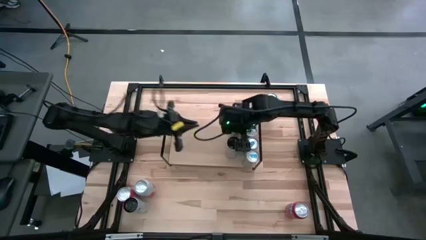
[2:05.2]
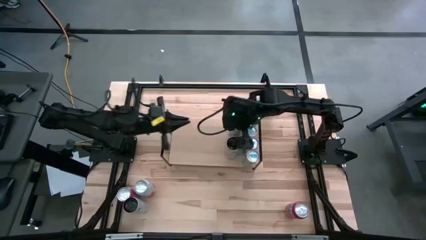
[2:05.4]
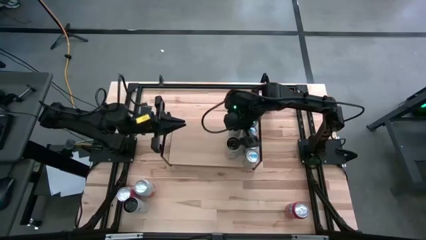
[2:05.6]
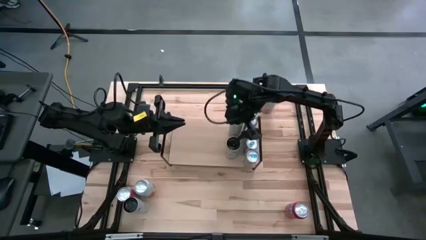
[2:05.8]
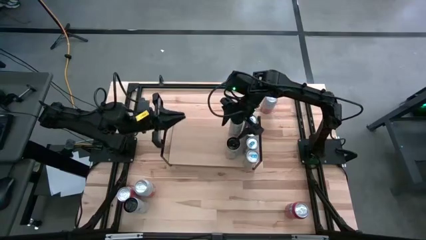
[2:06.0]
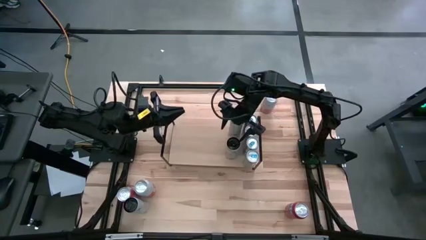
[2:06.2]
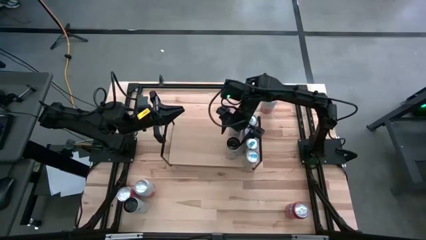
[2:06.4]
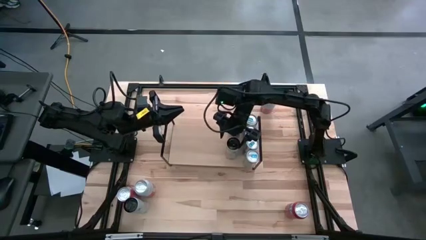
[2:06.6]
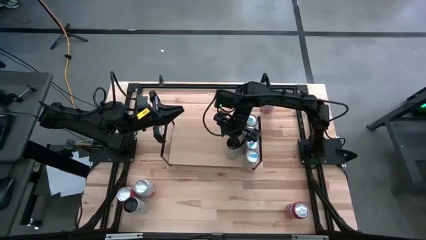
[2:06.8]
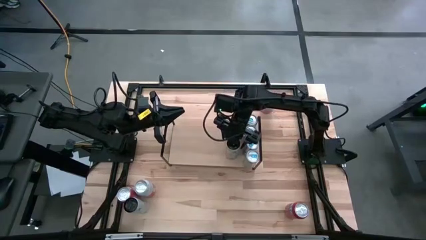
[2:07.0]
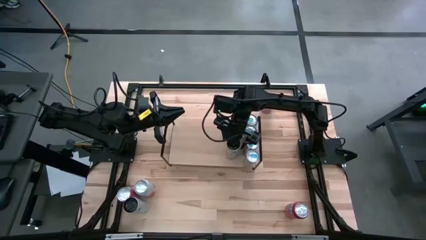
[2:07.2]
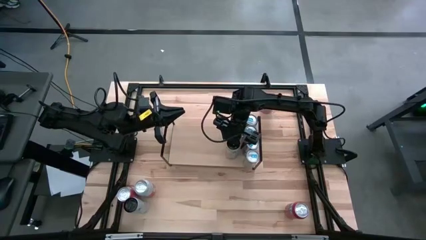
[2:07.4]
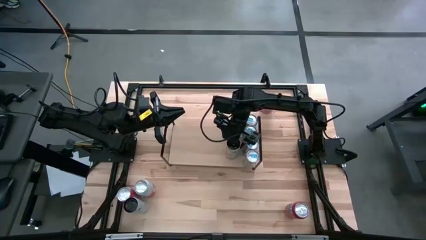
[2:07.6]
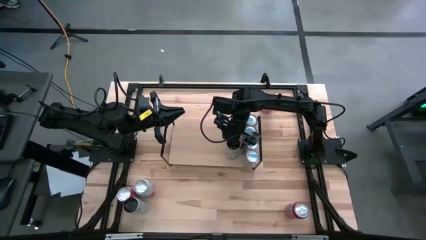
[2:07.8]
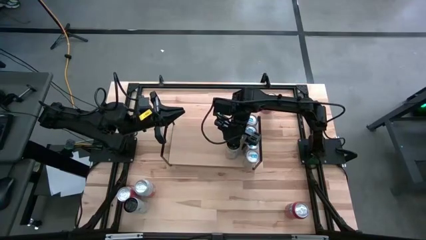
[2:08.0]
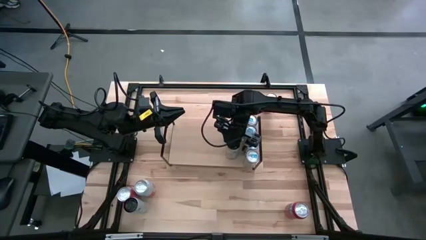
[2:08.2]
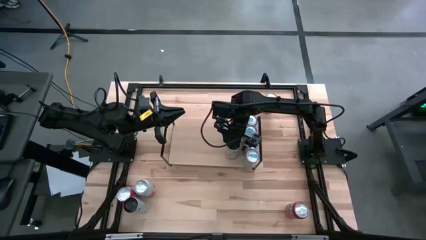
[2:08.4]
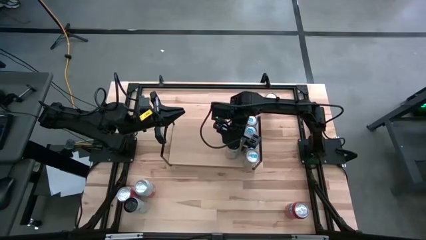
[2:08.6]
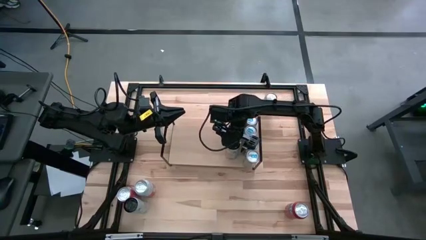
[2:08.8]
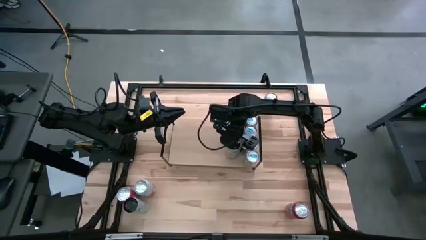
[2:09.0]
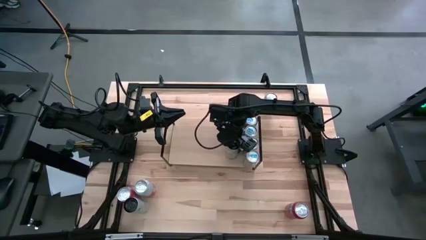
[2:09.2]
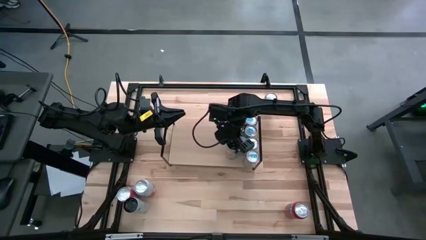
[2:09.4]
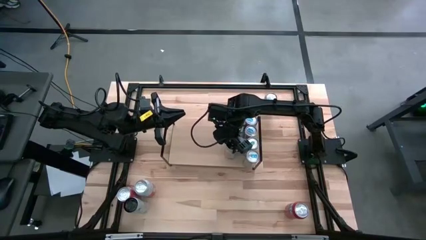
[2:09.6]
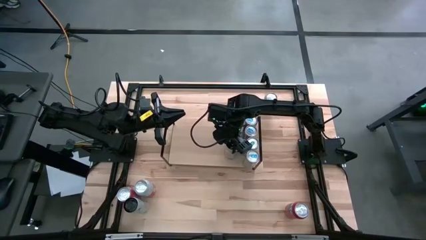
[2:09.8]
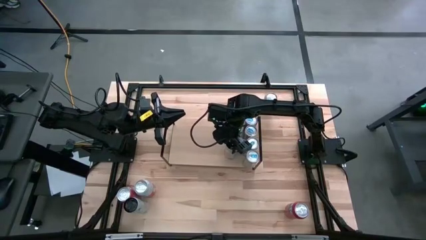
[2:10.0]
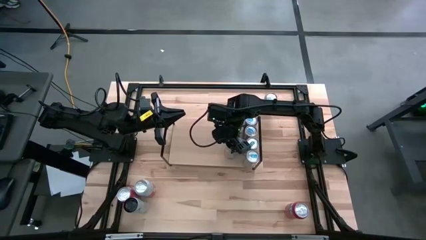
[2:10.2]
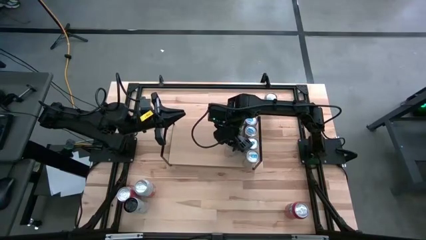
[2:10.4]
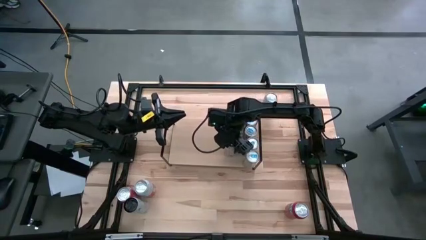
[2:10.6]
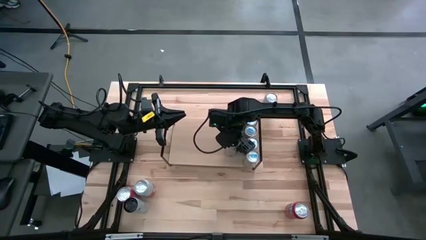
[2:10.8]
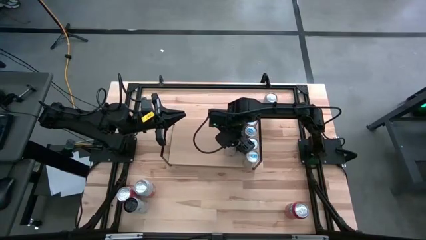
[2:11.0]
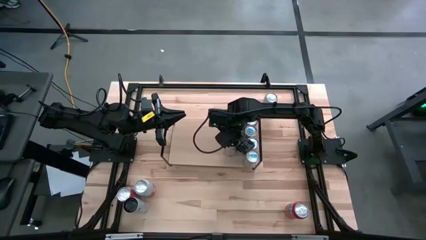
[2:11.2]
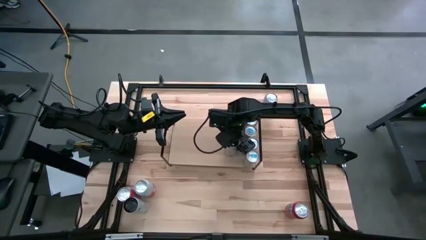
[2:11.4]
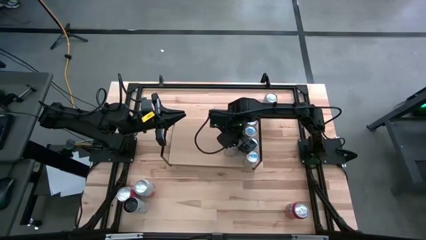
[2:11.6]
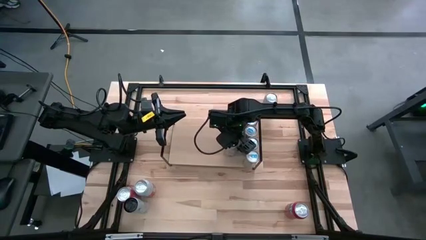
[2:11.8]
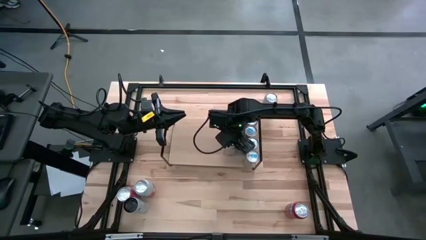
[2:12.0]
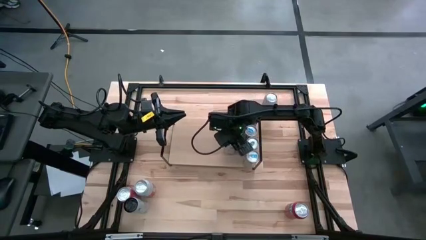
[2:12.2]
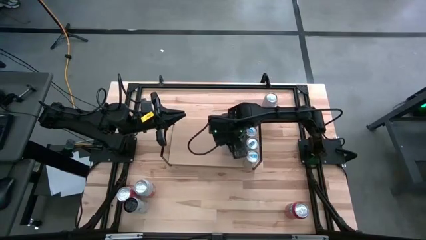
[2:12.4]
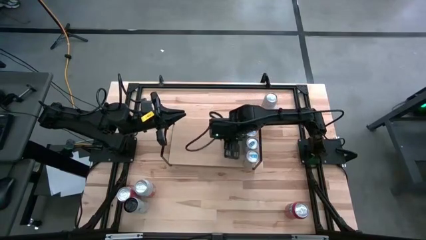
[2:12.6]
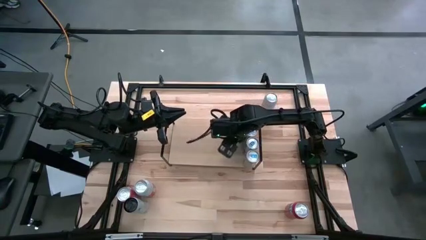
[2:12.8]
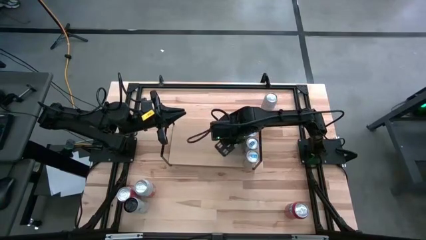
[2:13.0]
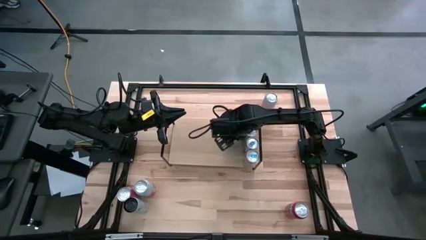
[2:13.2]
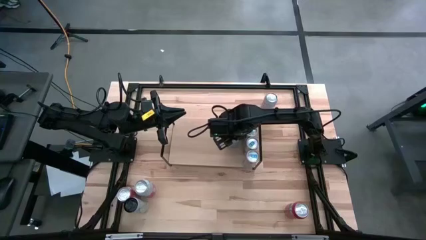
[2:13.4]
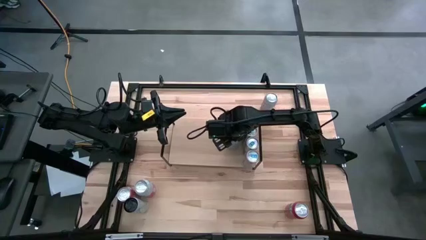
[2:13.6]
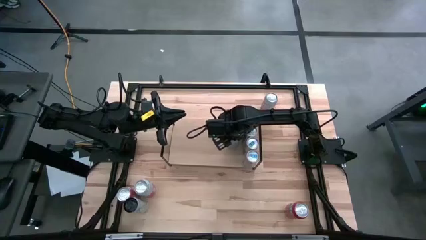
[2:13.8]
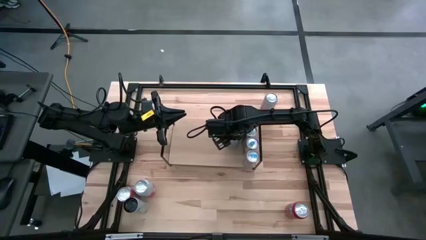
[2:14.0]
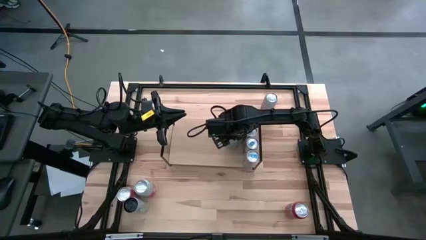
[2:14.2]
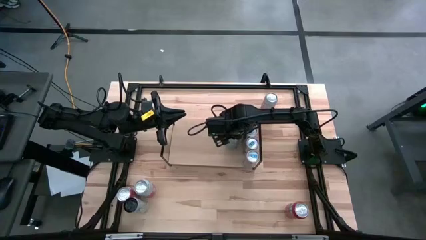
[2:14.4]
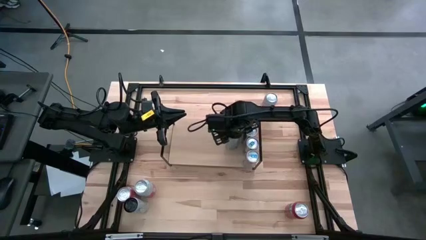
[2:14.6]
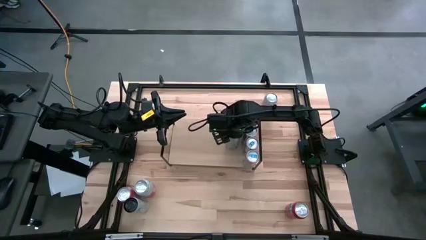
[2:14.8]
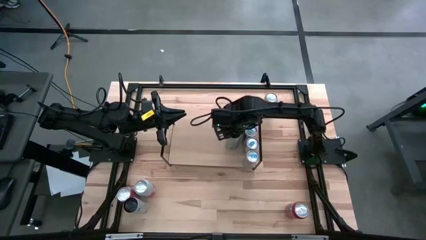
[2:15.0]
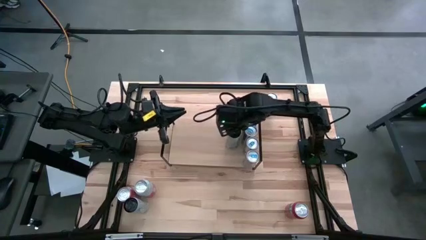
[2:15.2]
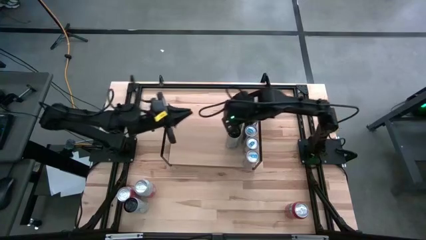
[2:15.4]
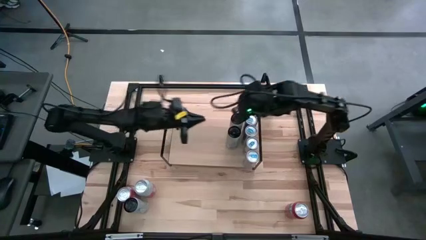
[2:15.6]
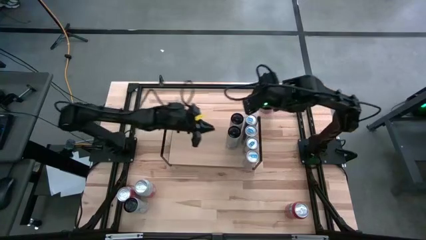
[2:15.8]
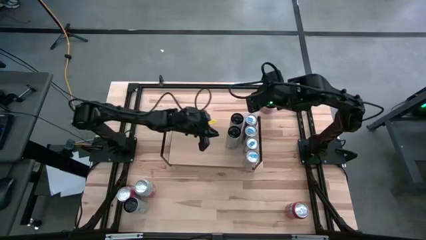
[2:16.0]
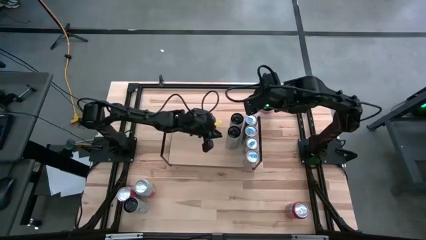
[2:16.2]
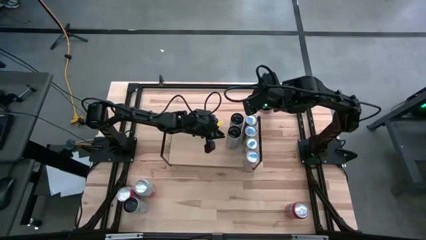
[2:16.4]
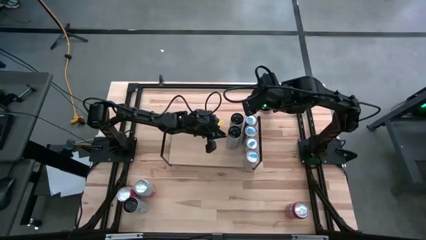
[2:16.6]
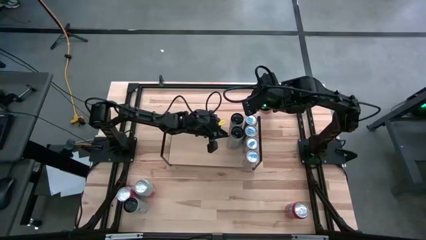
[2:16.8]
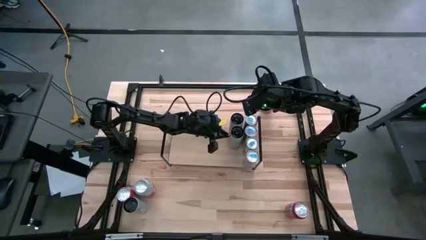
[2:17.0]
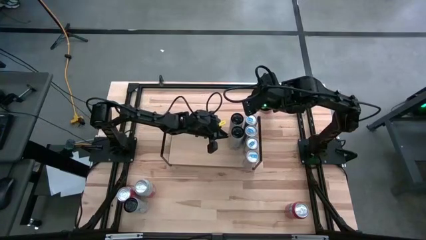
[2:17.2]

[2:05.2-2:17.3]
Task: Place canned beverage on shelf
Put the black soda can aligned with the other black soda can on the shelf
